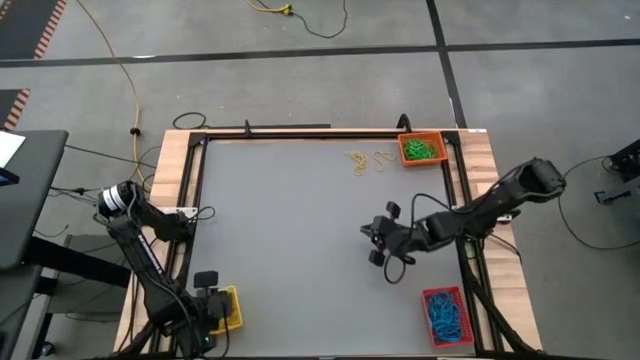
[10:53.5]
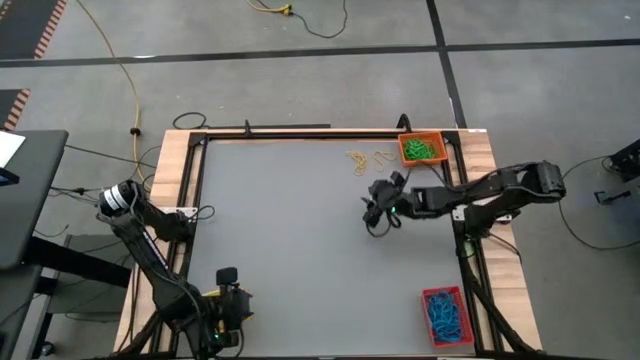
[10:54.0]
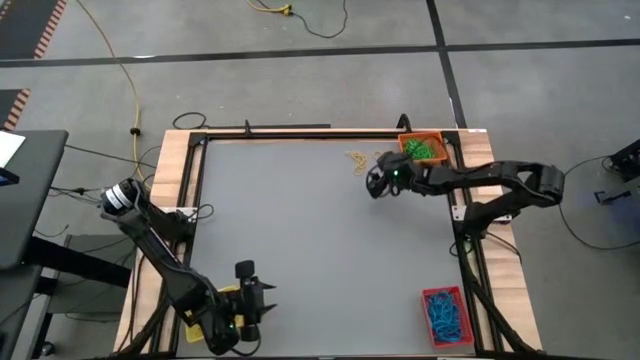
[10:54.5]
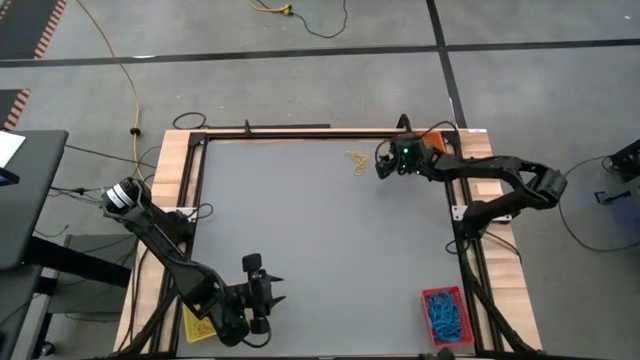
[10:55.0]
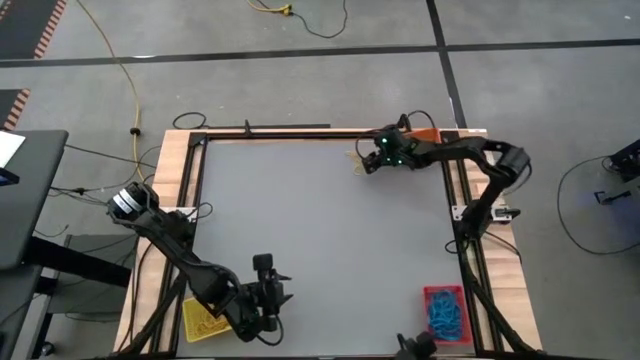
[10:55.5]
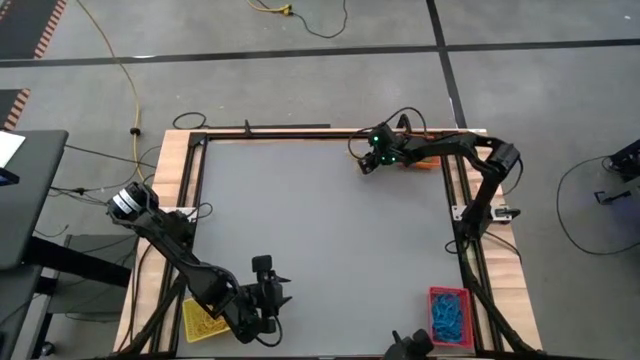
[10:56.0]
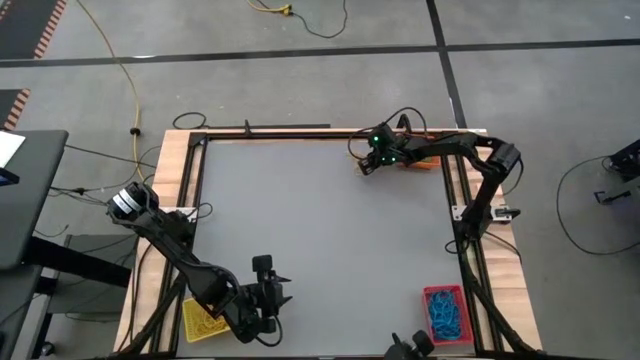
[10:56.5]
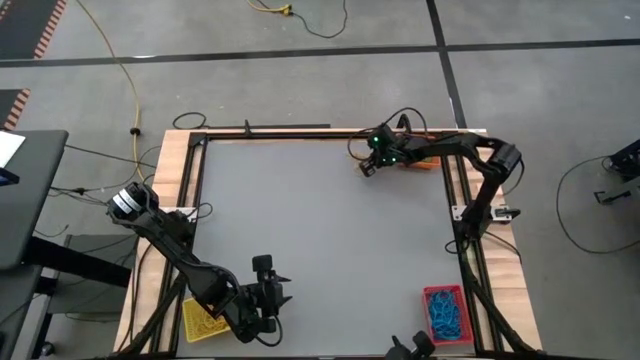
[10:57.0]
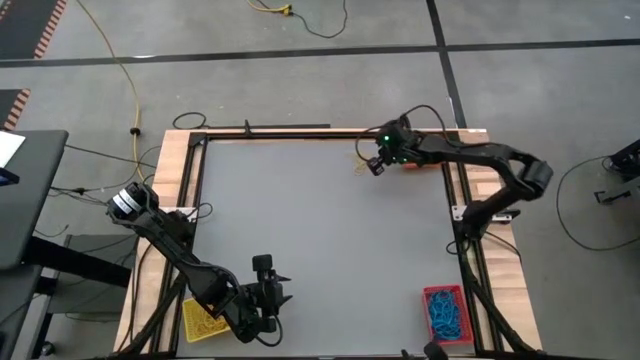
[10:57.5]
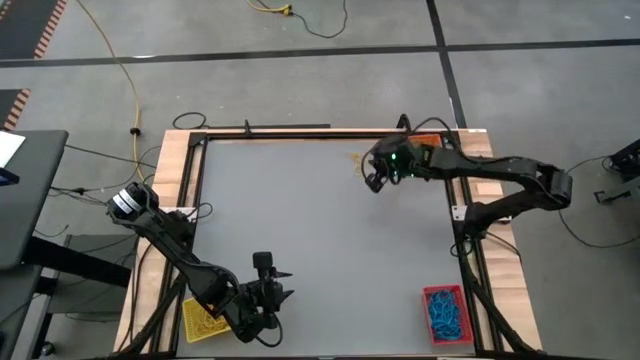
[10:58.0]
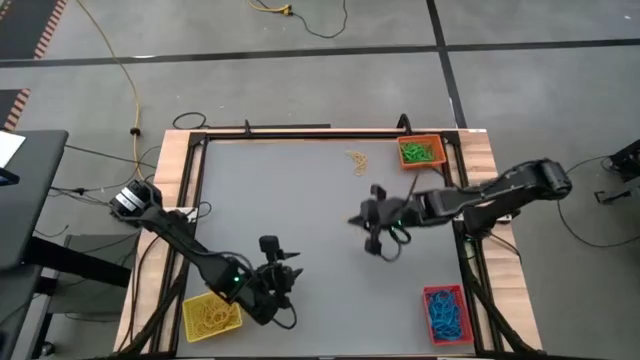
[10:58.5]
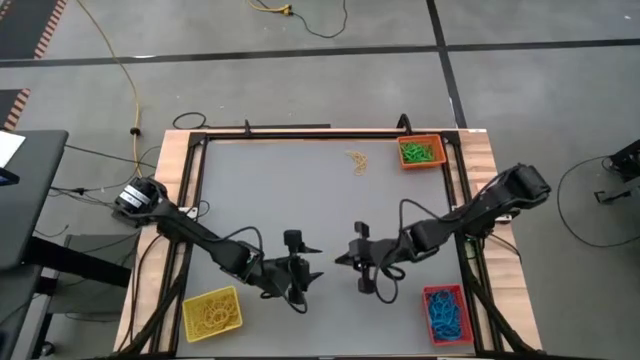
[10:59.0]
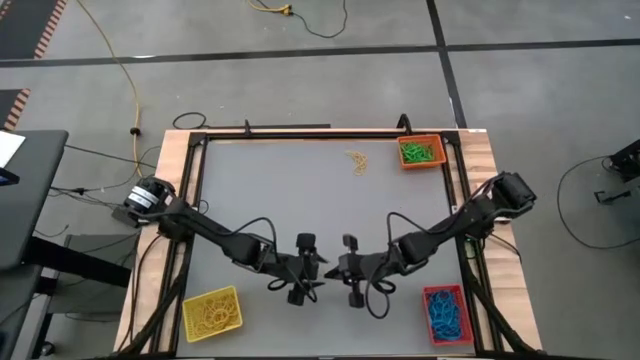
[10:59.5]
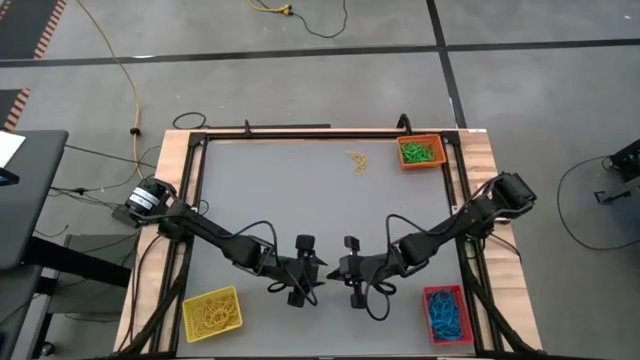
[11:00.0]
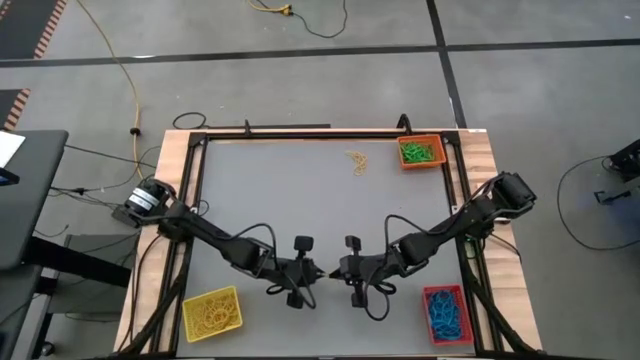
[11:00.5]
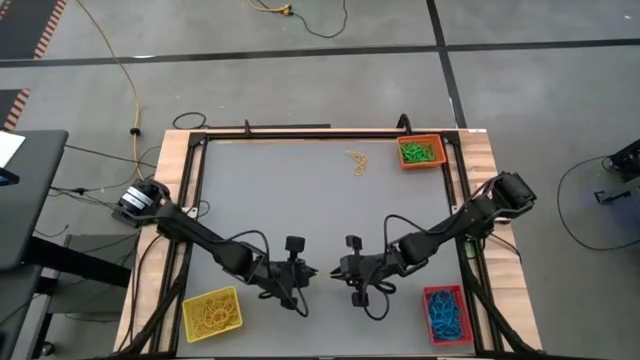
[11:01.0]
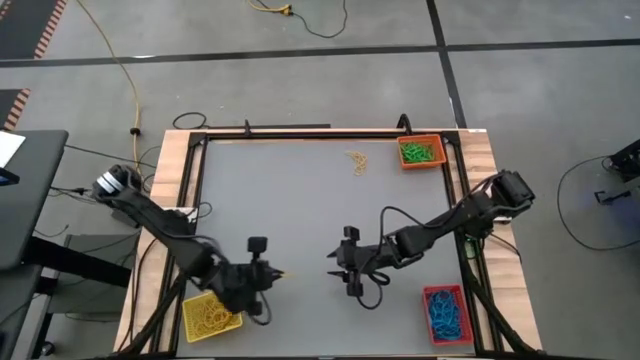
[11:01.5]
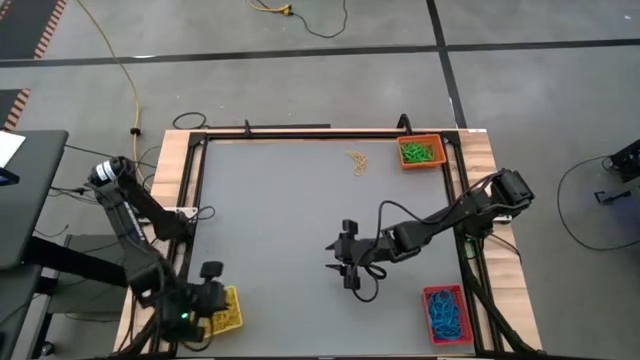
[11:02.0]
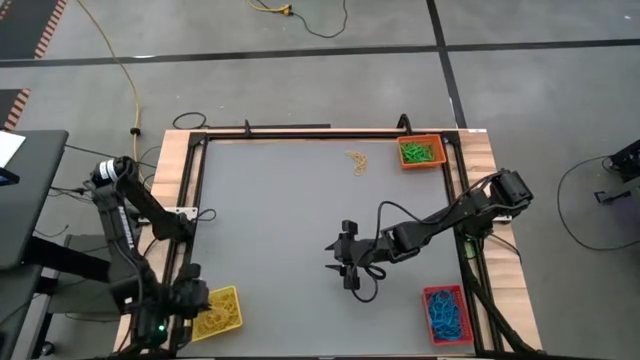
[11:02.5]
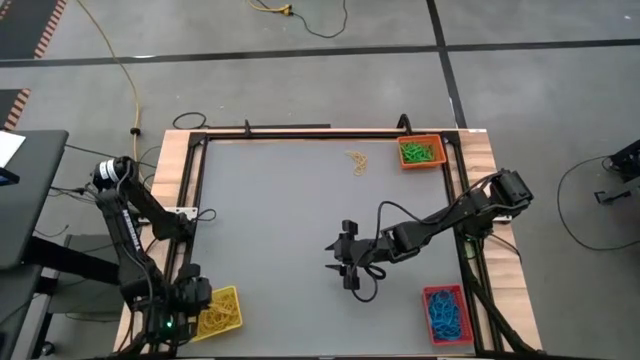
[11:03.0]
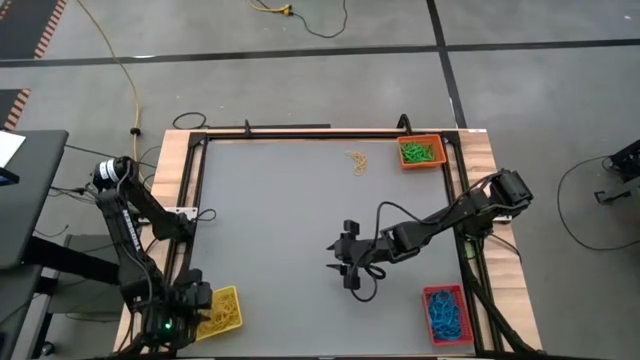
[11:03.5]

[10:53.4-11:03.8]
Task: Sort rubber bands into baskets
Put the yellow rubber band into the yellow bin

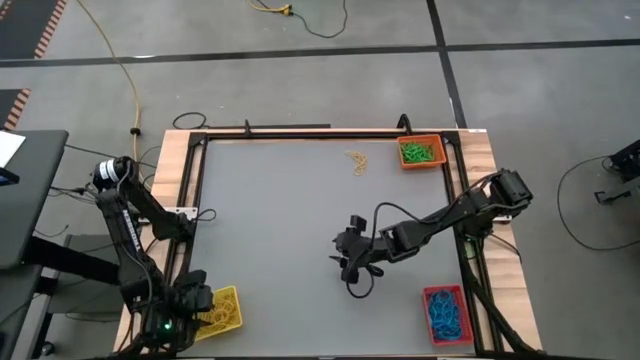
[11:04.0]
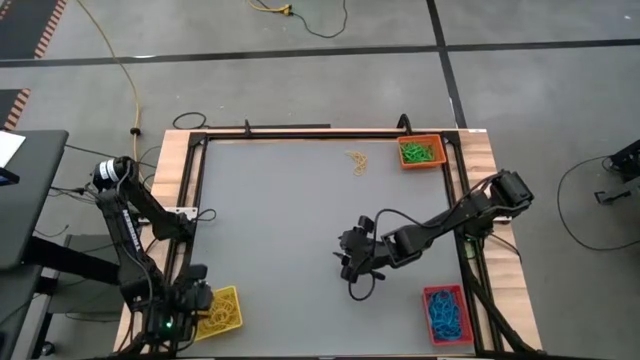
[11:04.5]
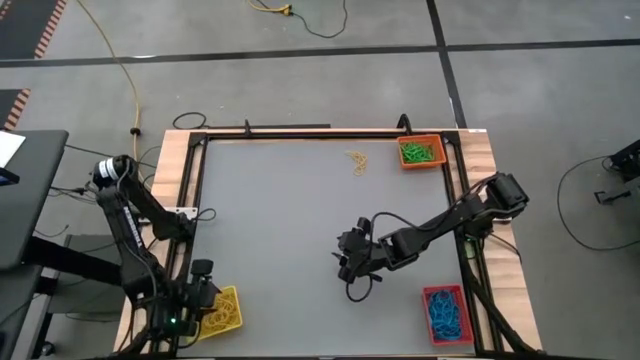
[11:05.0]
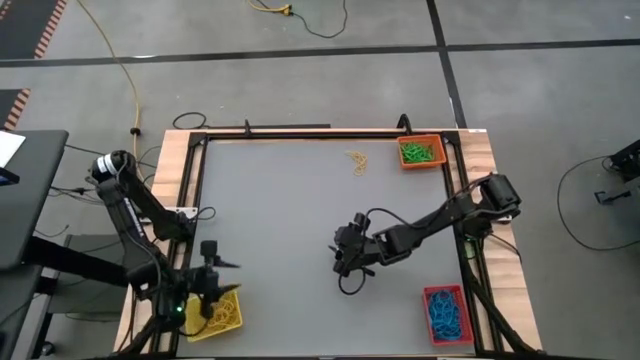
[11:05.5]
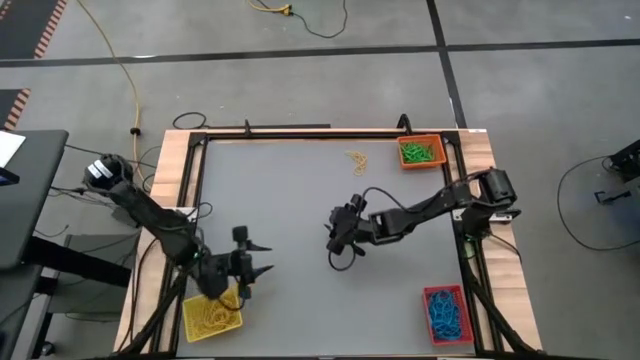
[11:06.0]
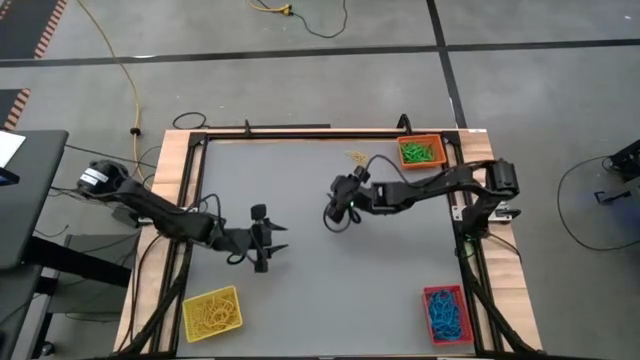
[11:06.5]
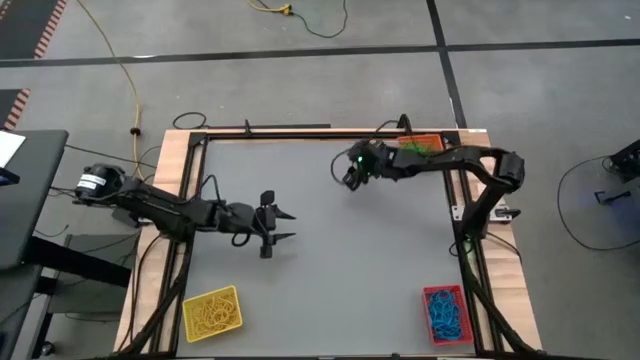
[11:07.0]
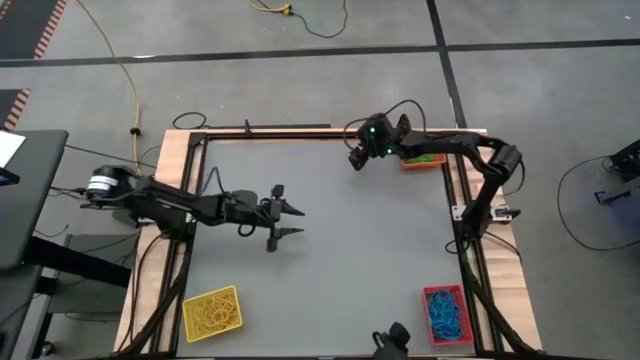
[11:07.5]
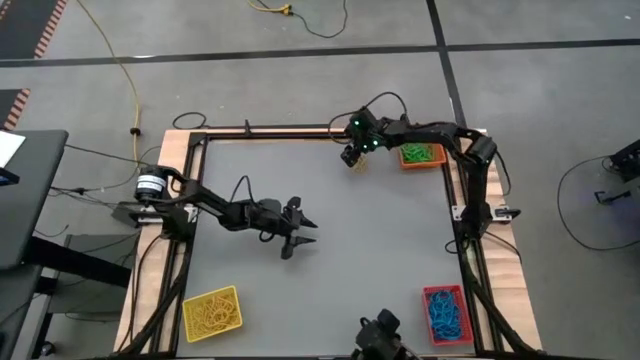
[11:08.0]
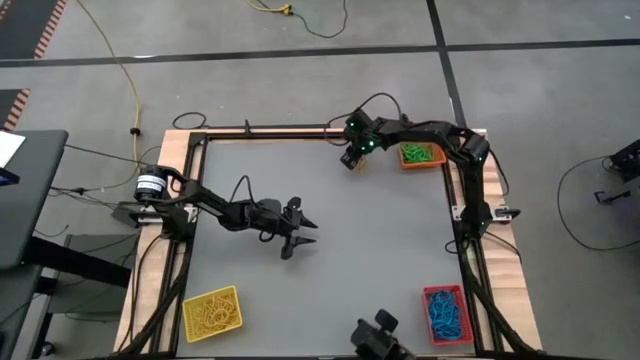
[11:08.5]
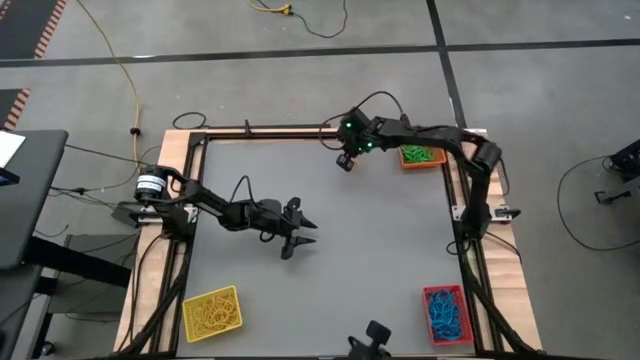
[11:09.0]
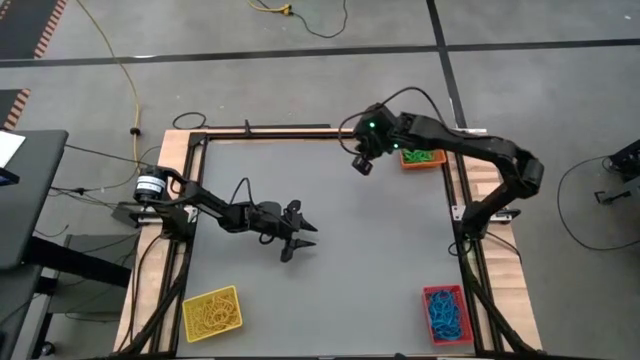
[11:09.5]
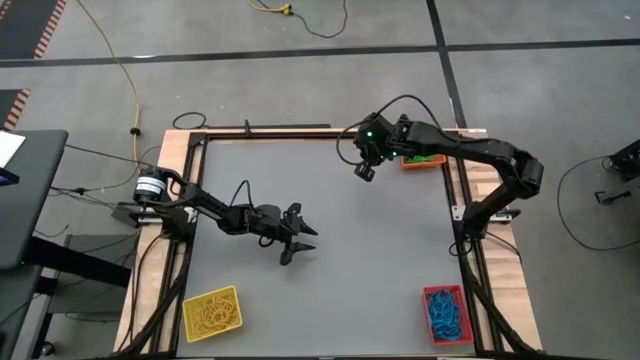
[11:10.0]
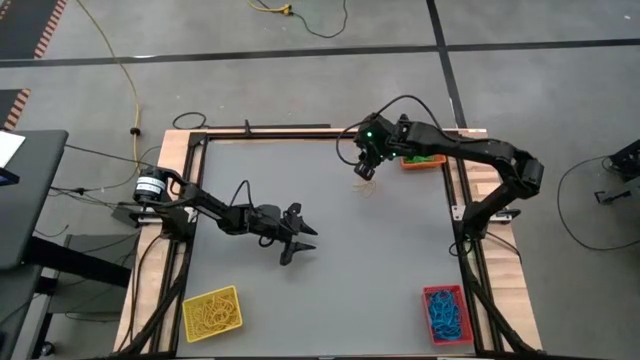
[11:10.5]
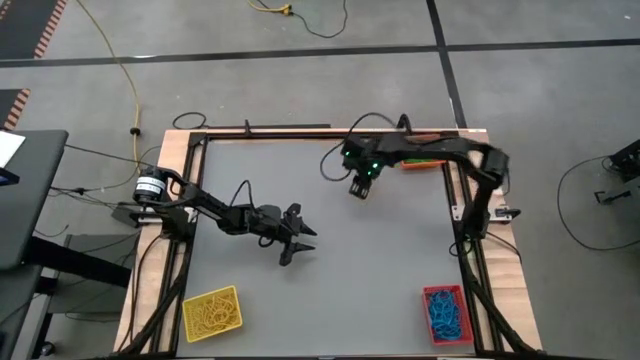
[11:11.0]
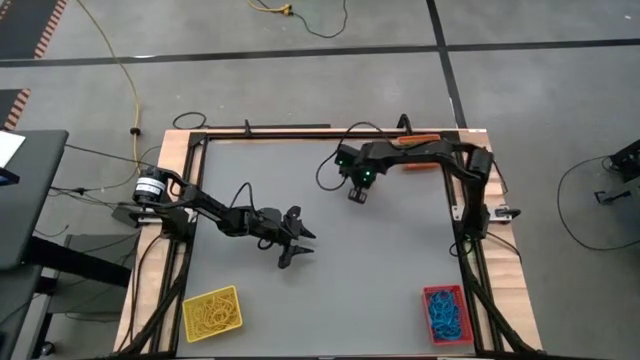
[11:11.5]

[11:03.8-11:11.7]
Put the yellow rubber band into the yellow bin

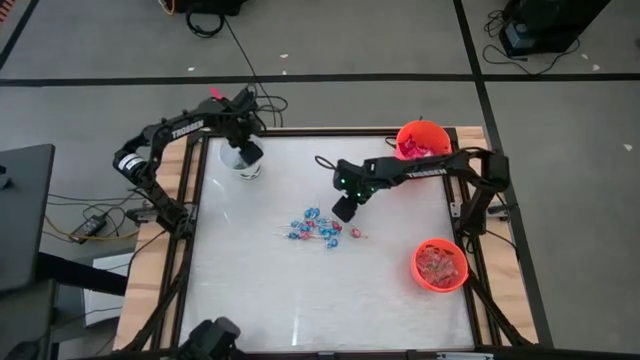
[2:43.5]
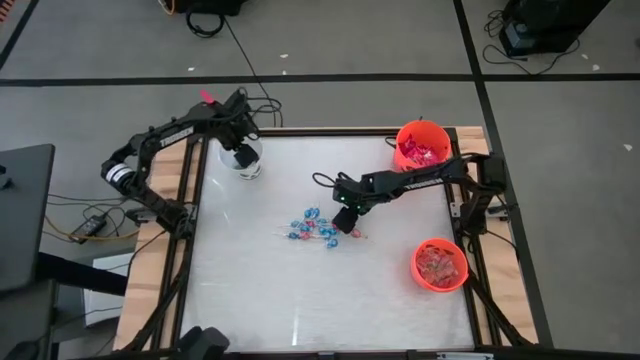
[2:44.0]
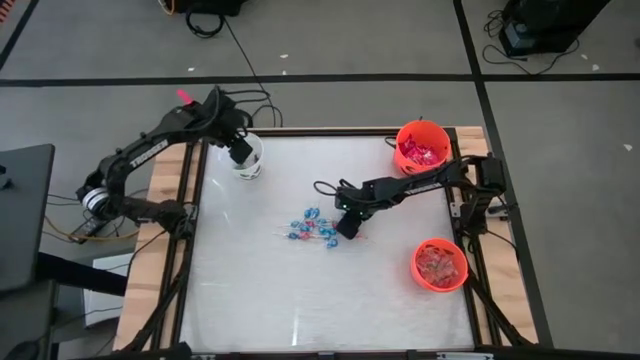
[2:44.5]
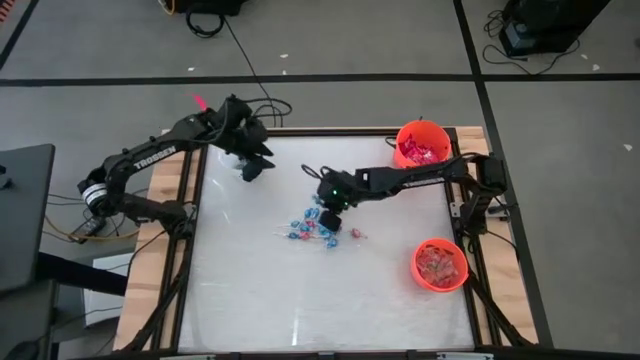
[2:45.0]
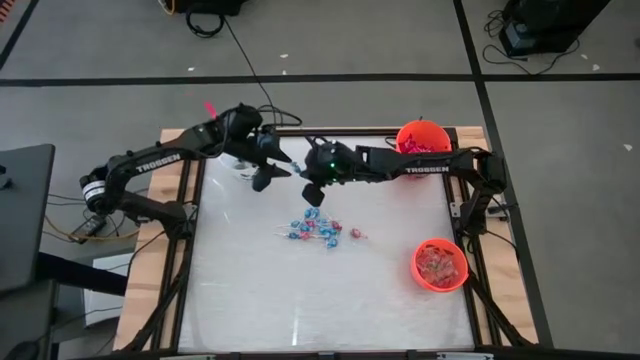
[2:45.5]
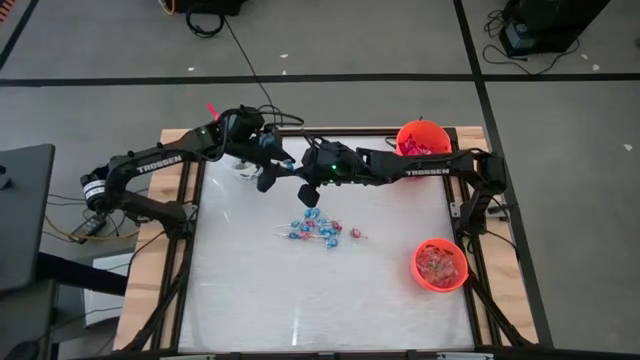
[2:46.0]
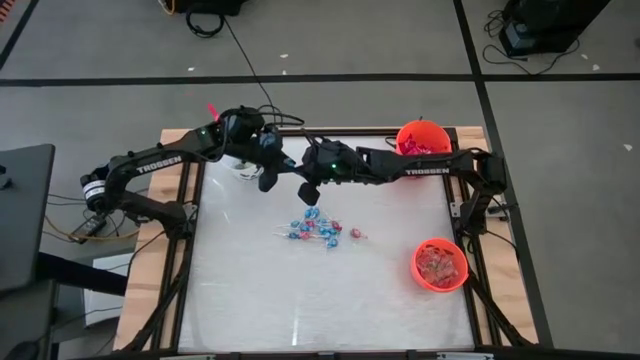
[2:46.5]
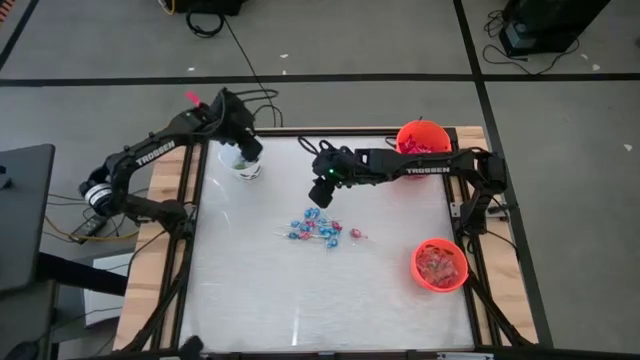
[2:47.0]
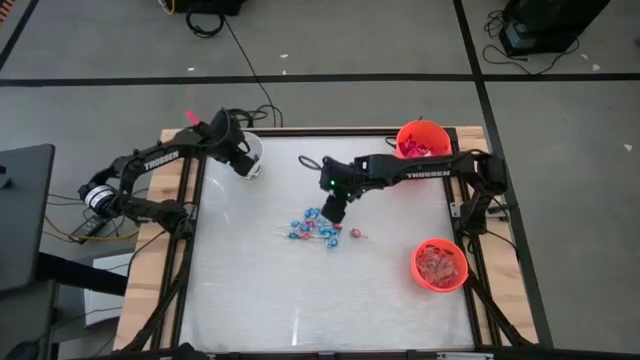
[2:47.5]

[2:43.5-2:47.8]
Task: Sort candy by brand, put in halloween buckets
Put the blue candy into the white bucket
